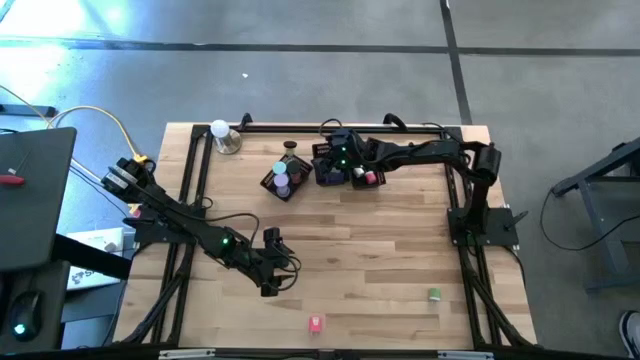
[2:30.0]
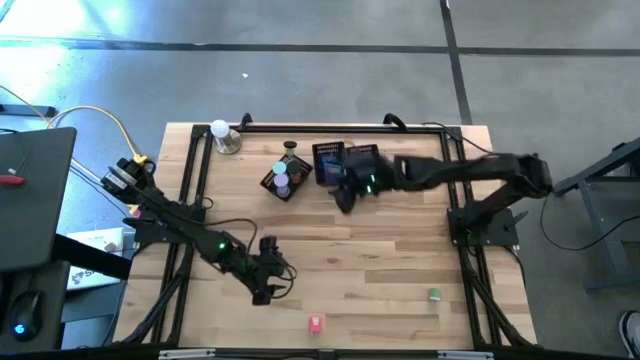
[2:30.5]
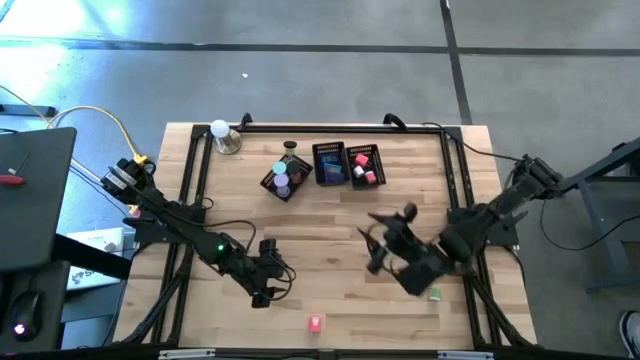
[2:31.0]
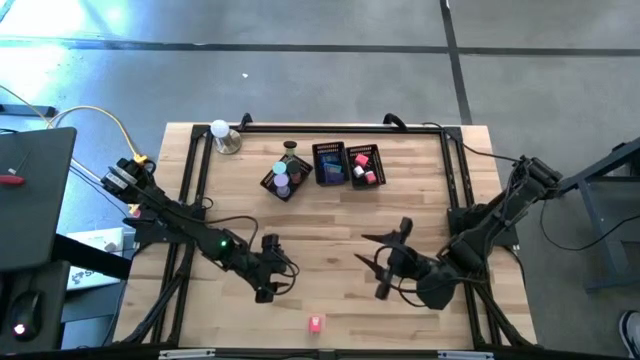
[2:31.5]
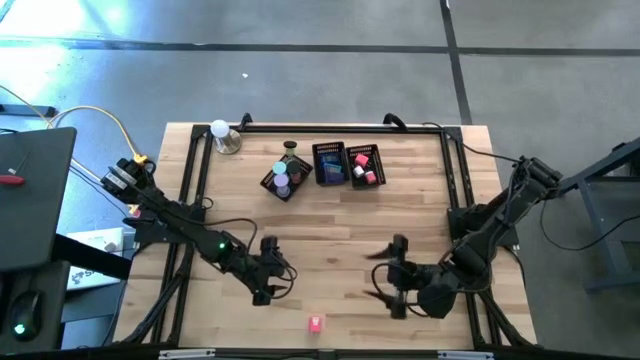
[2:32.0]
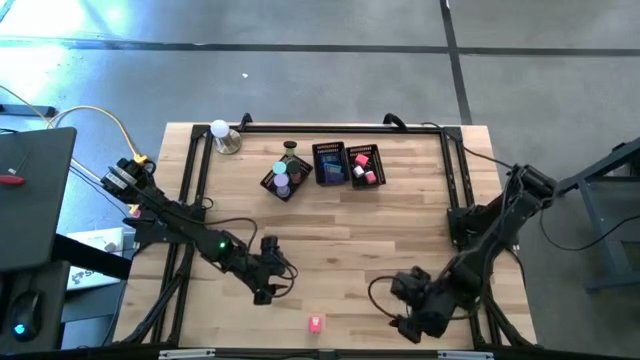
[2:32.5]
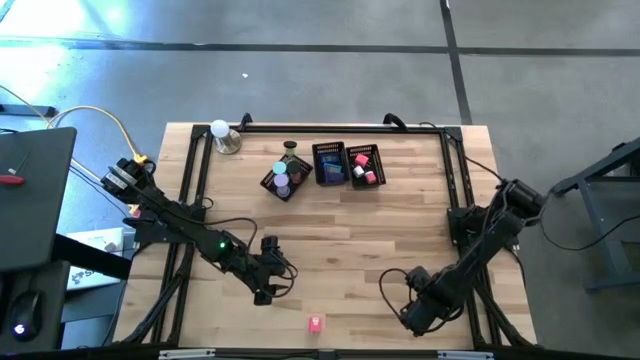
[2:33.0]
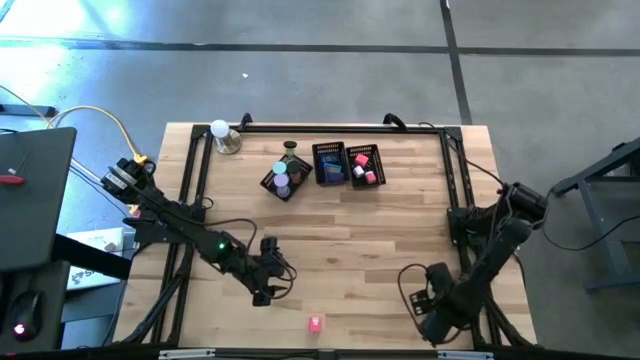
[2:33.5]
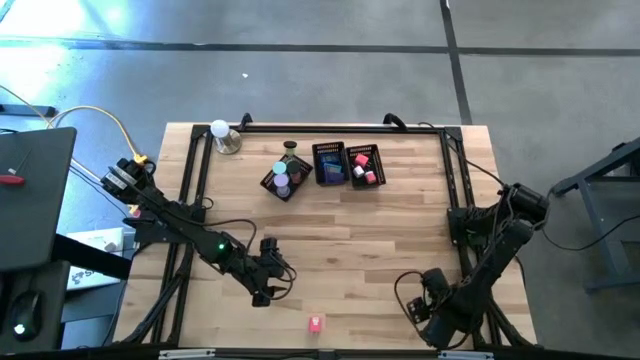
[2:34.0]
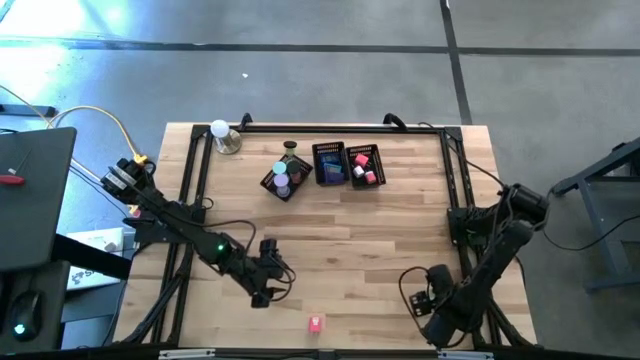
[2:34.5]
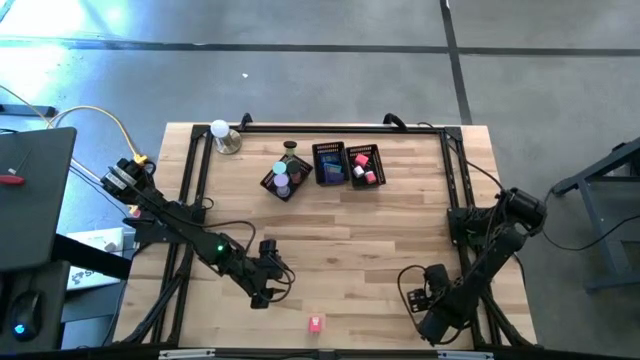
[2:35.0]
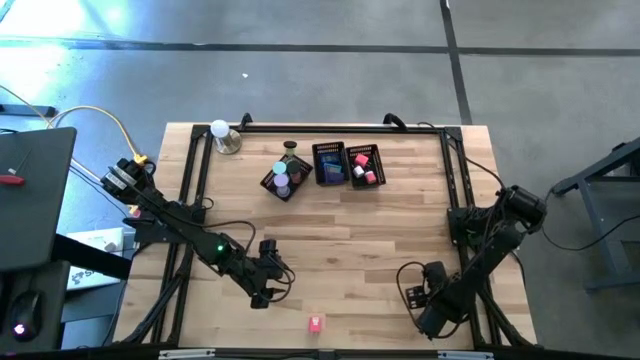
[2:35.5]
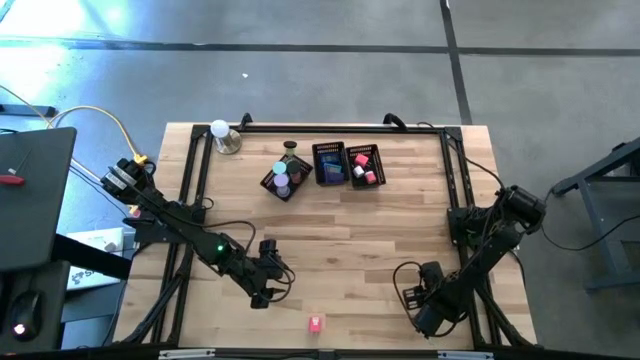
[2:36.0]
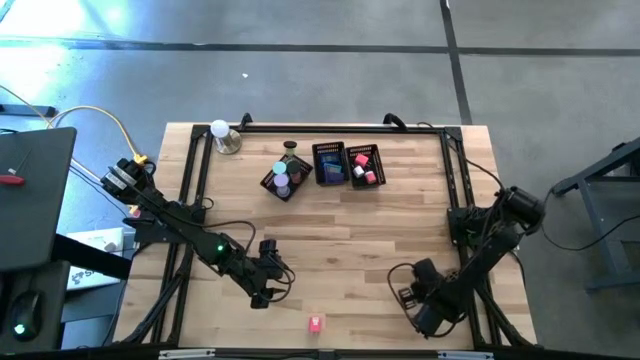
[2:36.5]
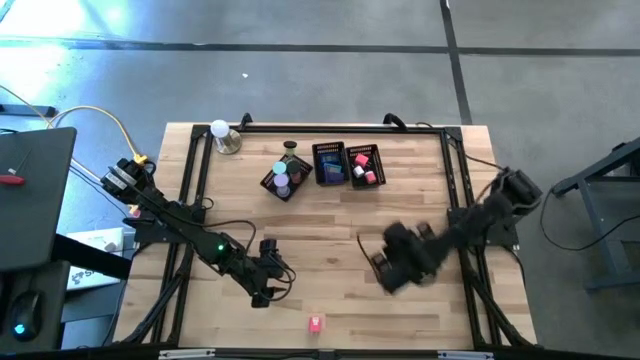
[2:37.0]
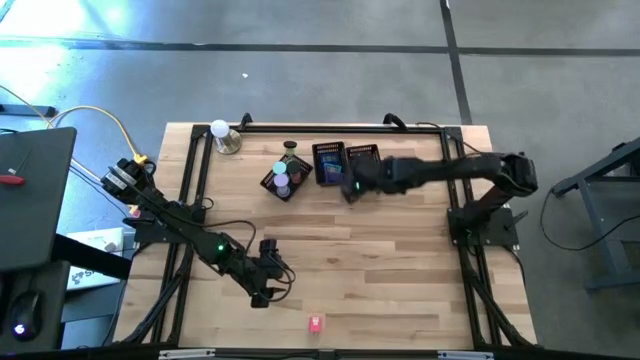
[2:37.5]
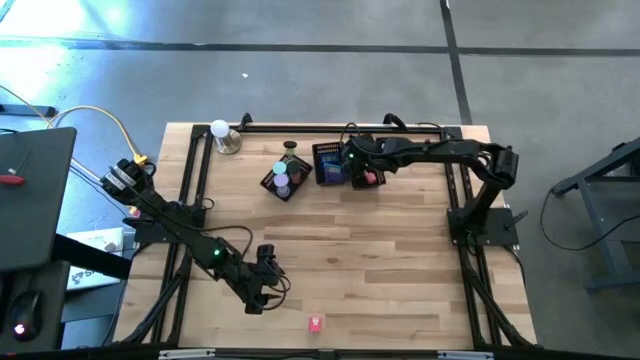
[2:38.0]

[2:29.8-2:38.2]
Task: Pick & Place Office items
Put the green charger adapter into the right black bin

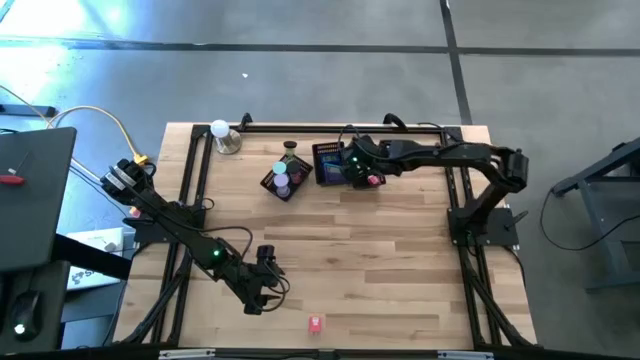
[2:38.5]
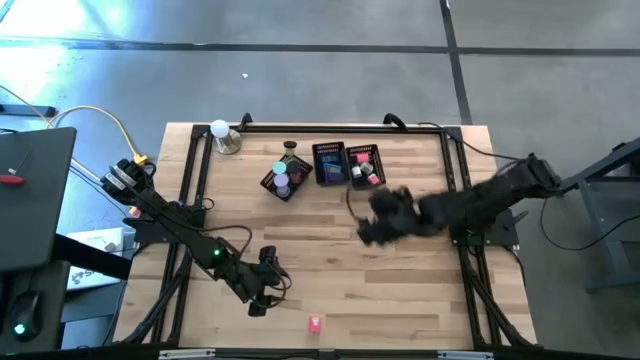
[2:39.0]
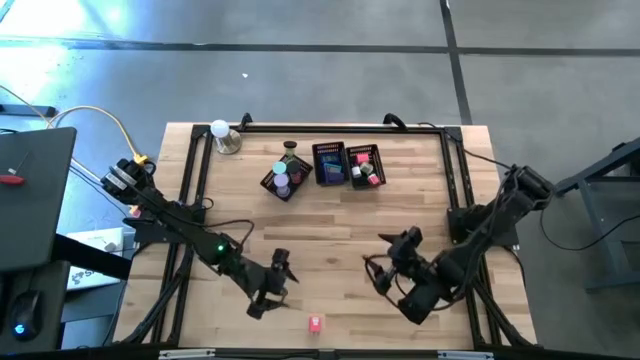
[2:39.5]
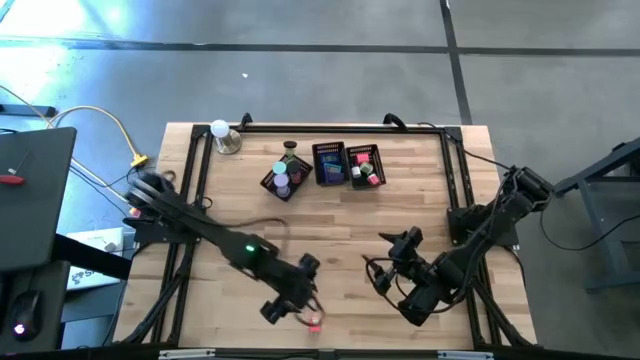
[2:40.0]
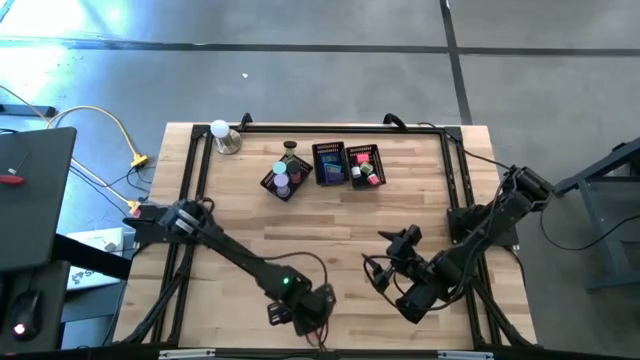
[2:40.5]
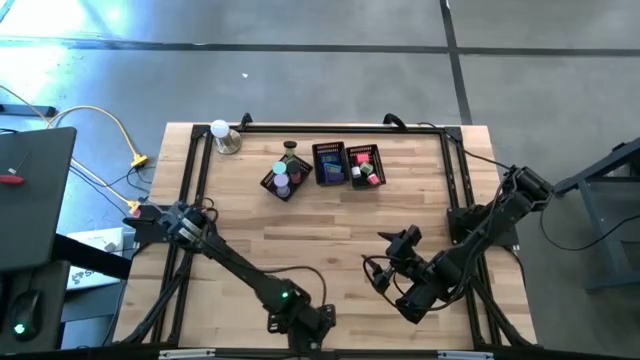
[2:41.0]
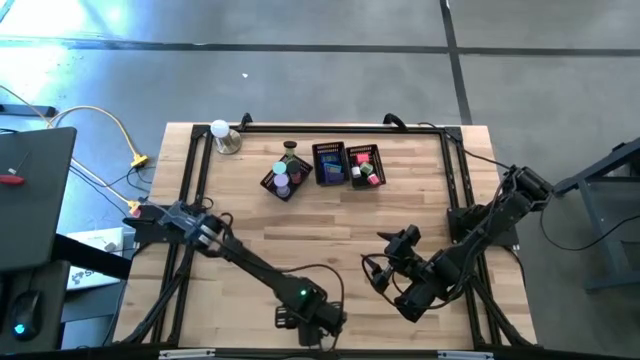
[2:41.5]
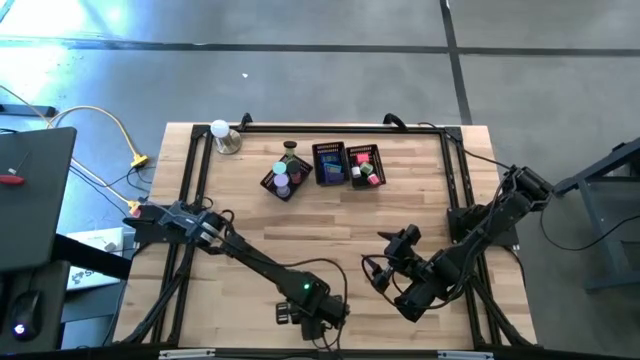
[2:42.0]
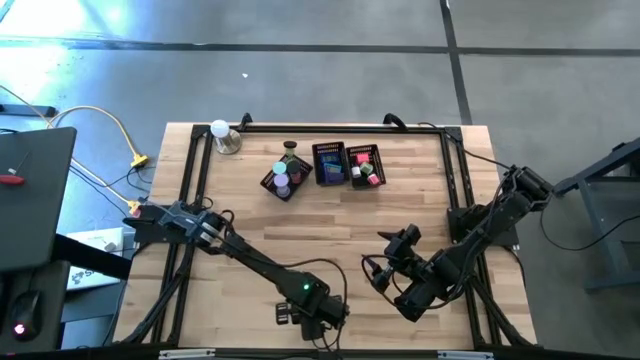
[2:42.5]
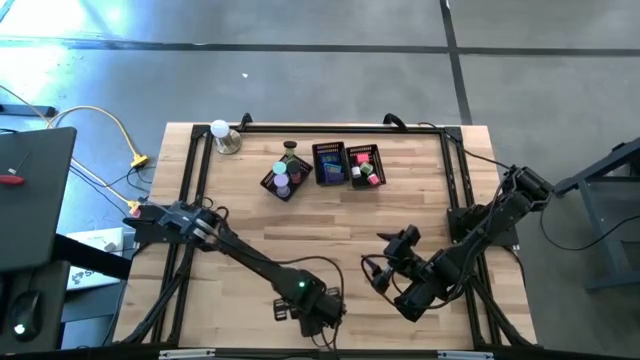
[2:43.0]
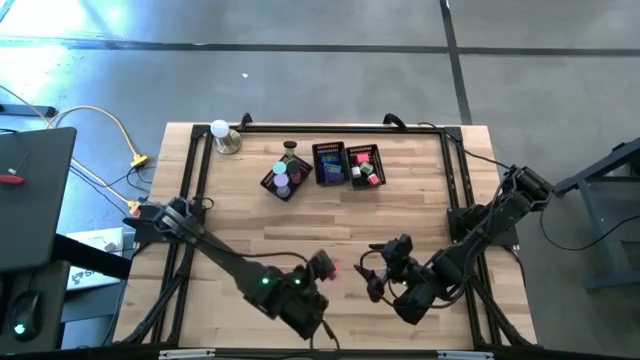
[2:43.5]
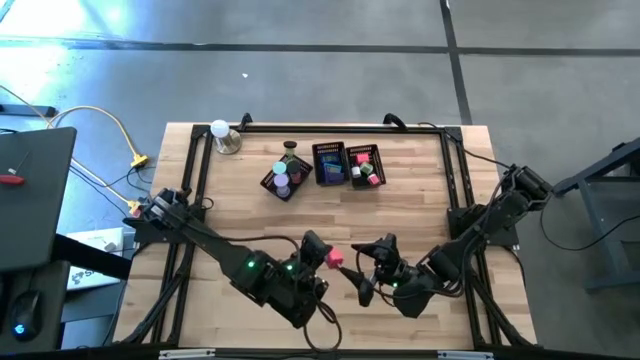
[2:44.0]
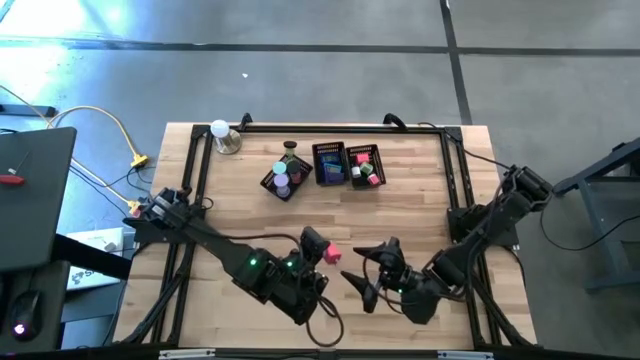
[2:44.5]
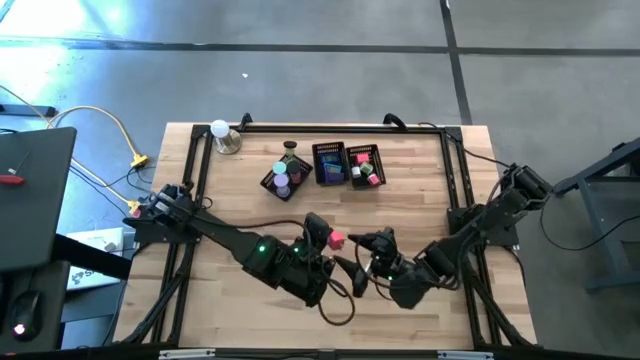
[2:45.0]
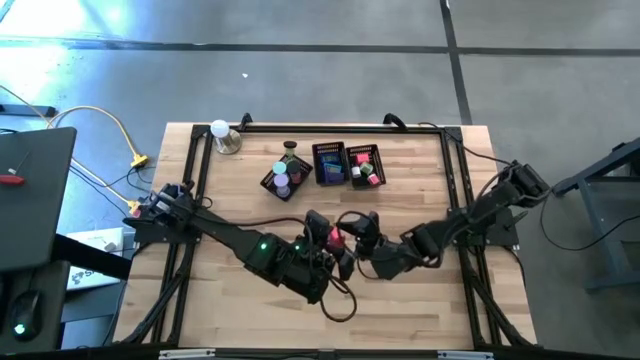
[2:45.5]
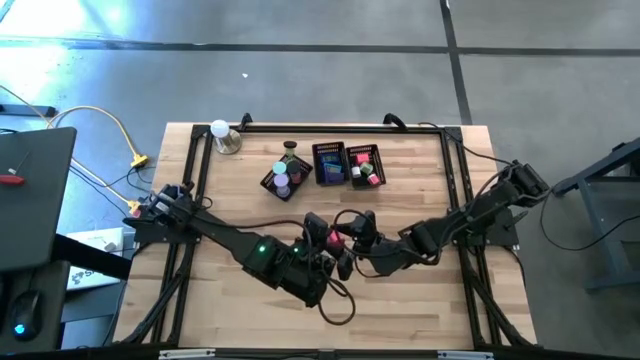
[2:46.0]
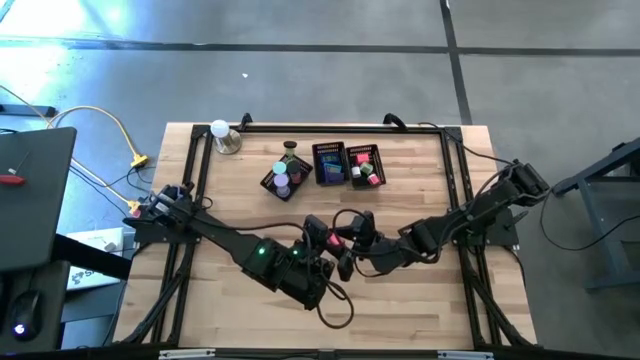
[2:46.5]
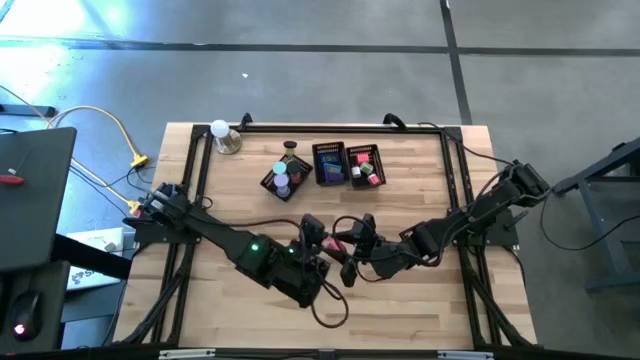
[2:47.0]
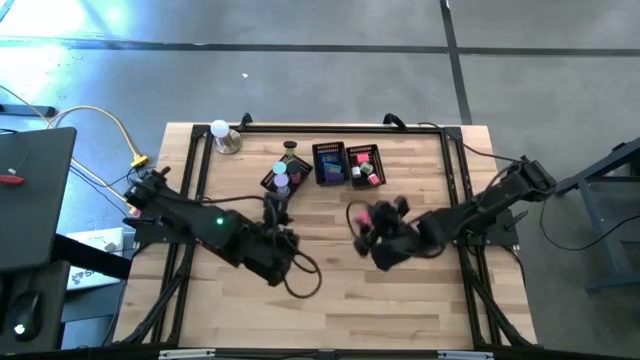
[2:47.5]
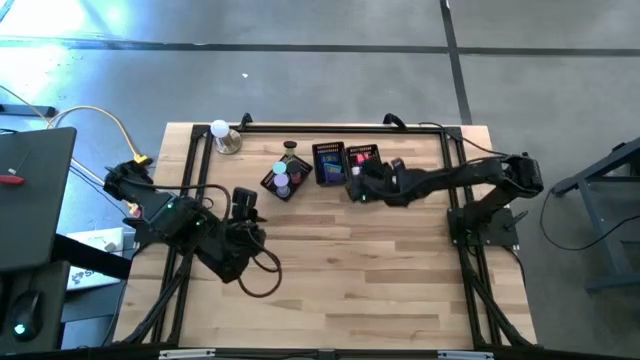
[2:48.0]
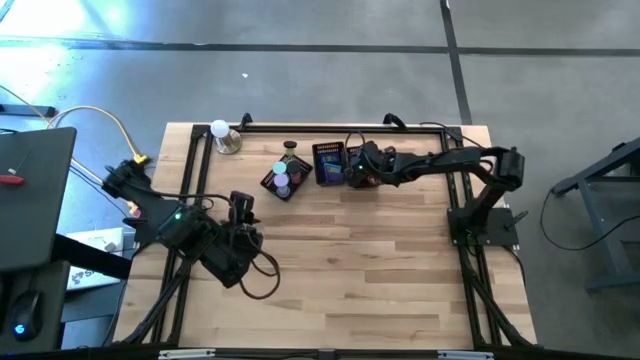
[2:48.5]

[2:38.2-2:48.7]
Put the pink charger adapter into the right black bin

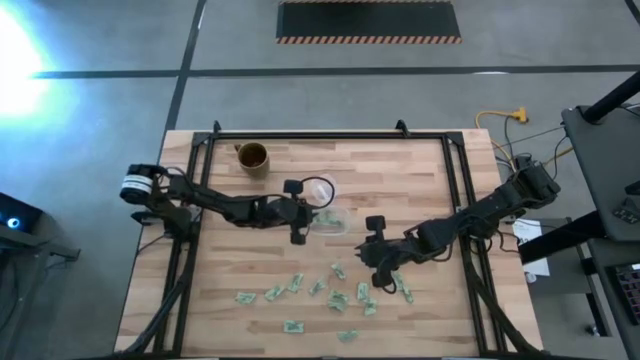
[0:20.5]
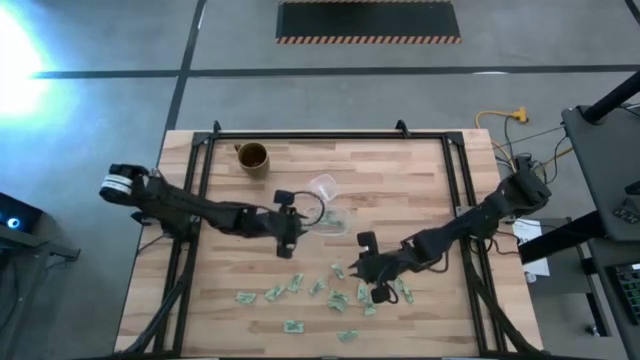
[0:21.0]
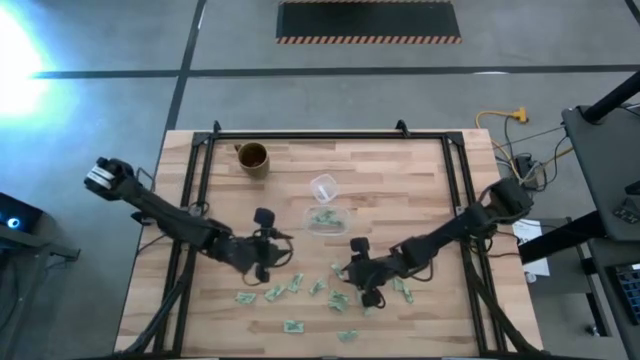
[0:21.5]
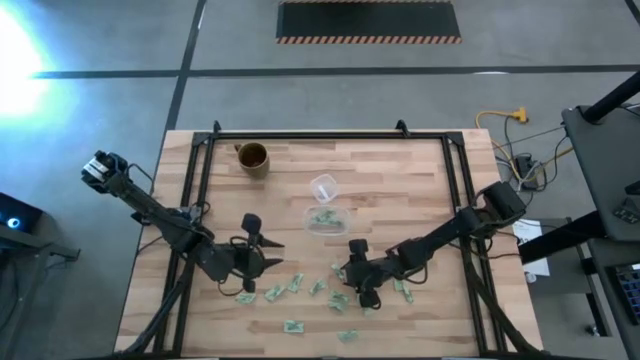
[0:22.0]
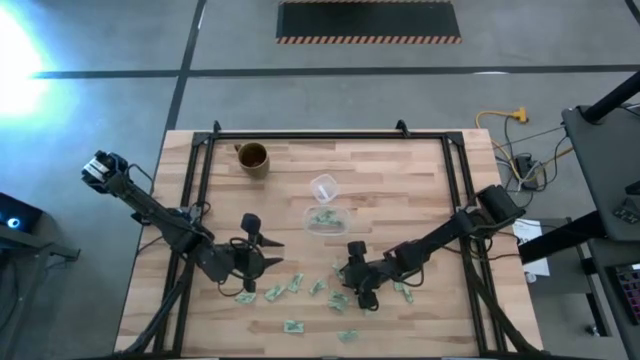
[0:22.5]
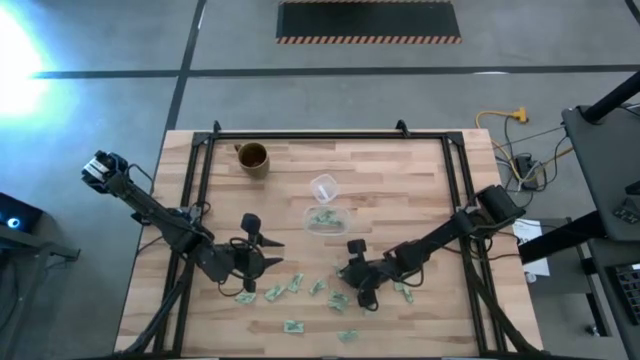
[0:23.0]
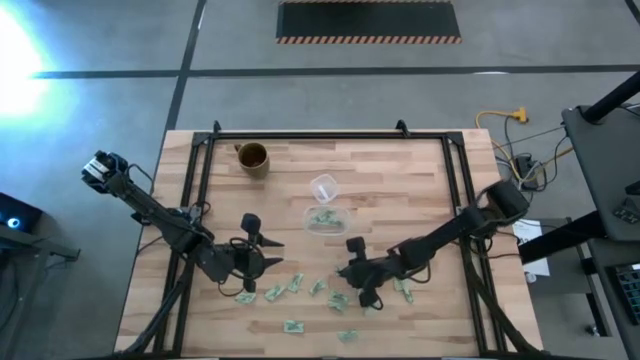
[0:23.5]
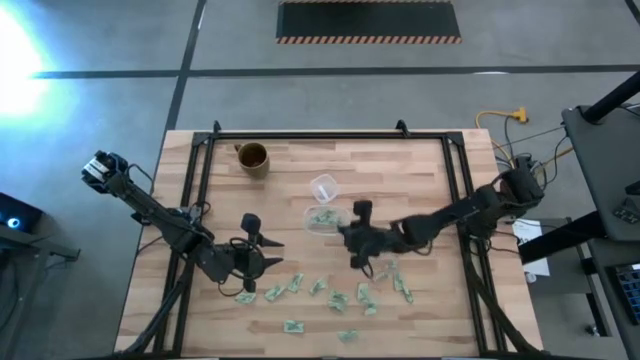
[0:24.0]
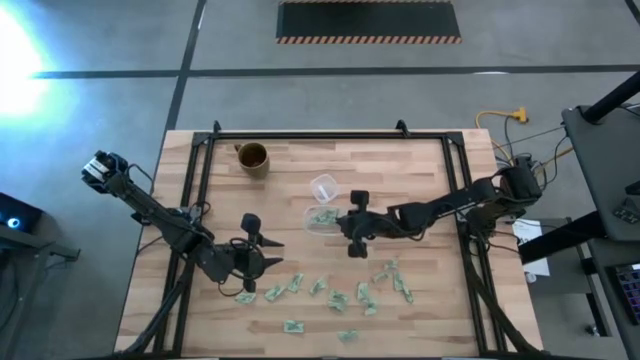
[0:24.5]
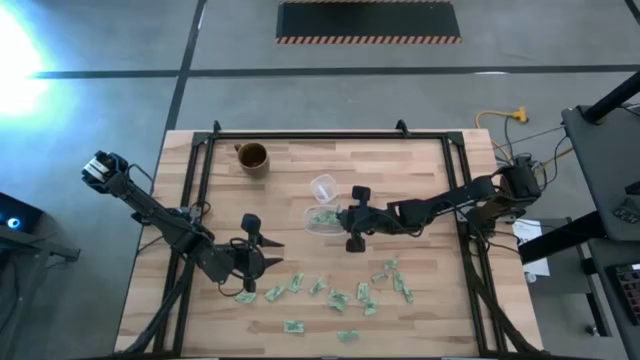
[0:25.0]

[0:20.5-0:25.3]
Task: Pick and place Stevia / Truvia into bins
Put the stevia packet into the bottom transparent container
